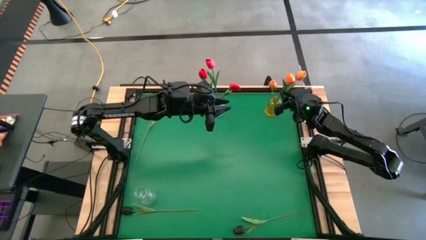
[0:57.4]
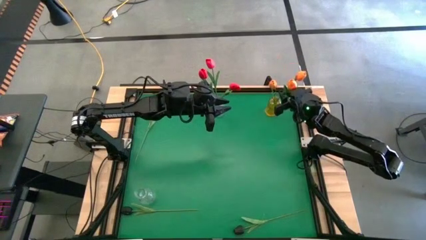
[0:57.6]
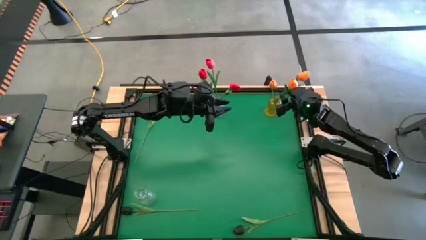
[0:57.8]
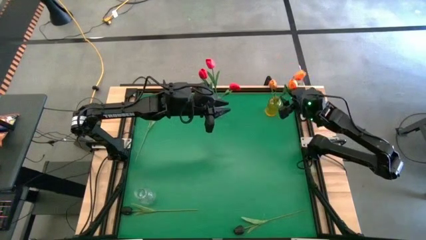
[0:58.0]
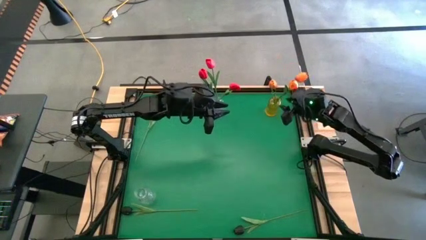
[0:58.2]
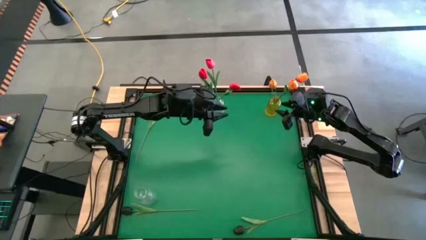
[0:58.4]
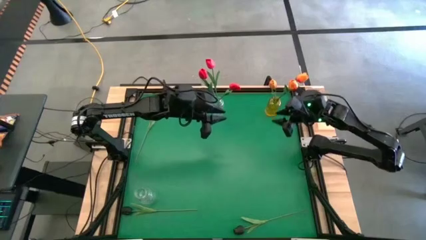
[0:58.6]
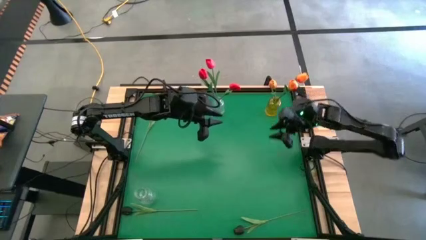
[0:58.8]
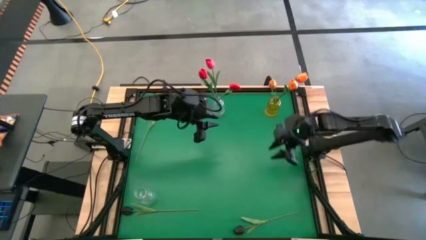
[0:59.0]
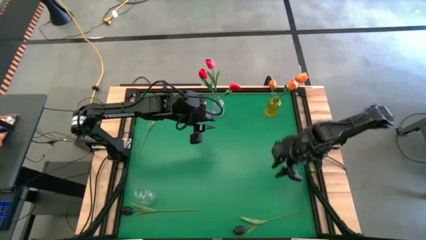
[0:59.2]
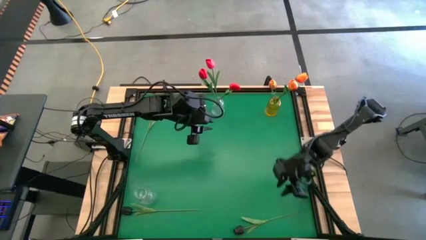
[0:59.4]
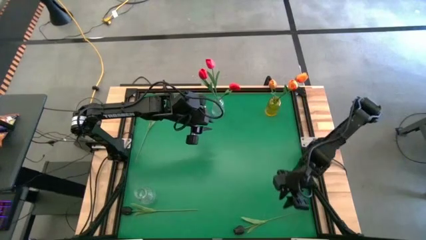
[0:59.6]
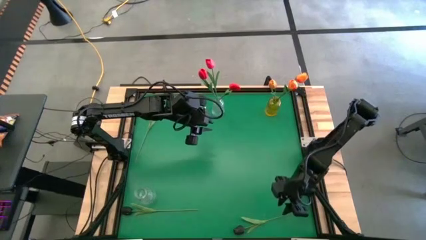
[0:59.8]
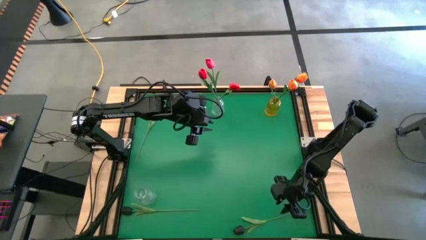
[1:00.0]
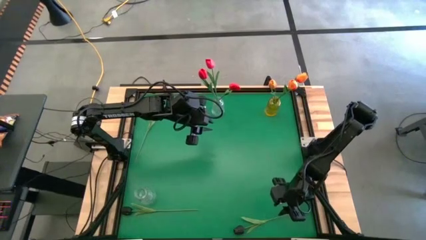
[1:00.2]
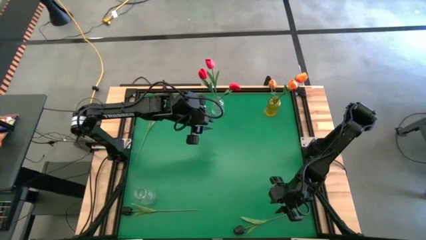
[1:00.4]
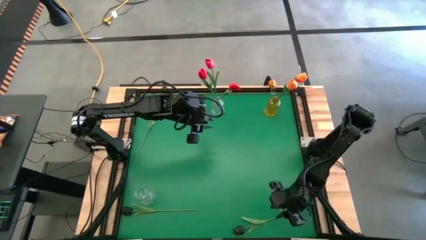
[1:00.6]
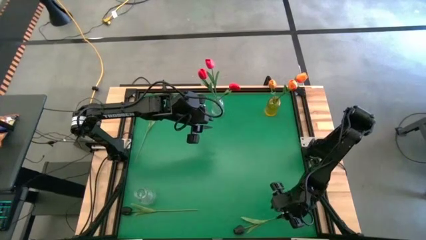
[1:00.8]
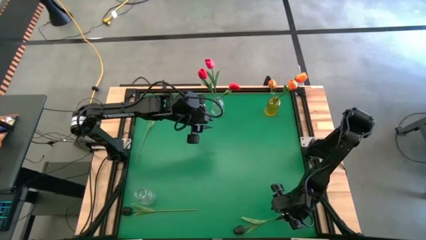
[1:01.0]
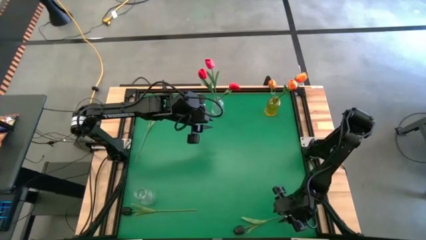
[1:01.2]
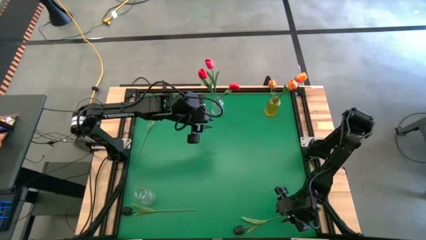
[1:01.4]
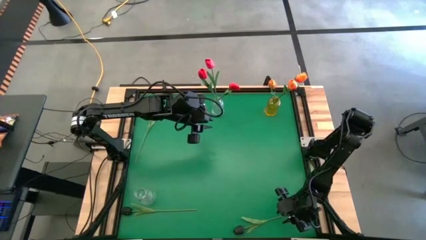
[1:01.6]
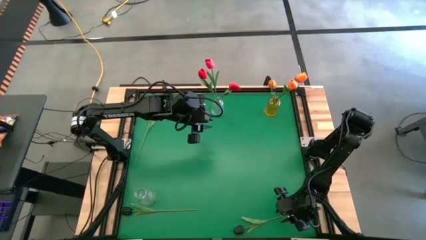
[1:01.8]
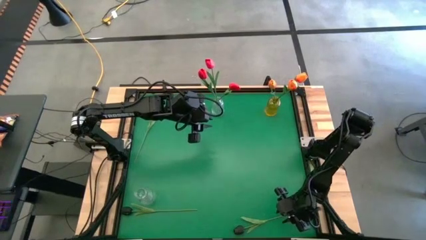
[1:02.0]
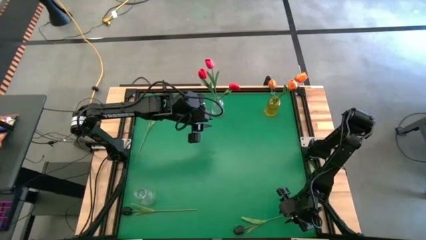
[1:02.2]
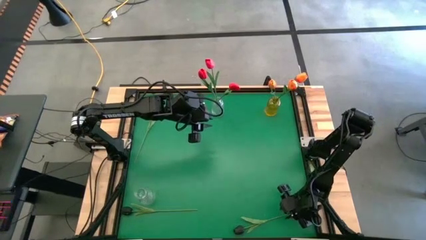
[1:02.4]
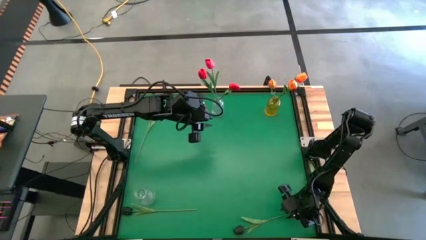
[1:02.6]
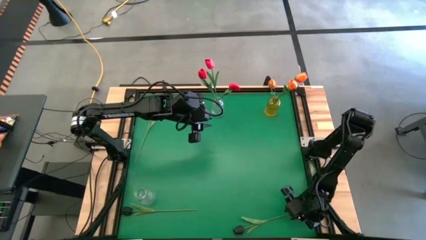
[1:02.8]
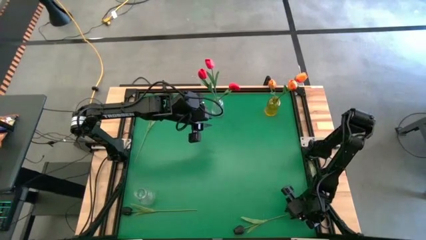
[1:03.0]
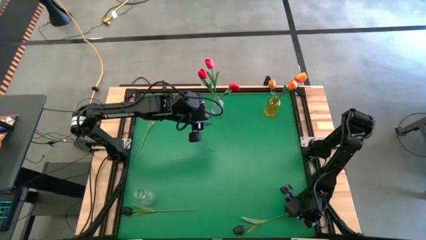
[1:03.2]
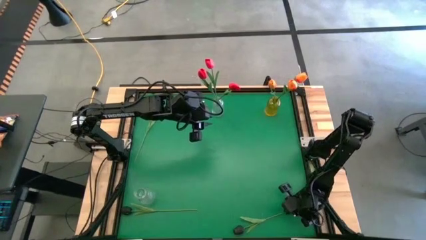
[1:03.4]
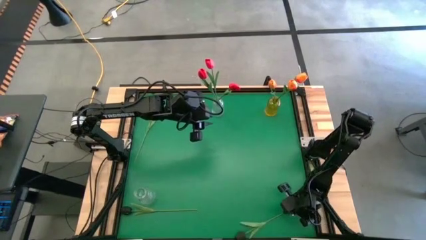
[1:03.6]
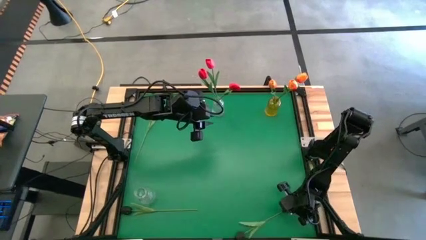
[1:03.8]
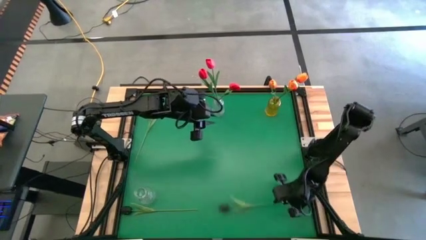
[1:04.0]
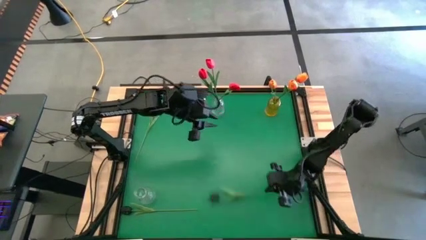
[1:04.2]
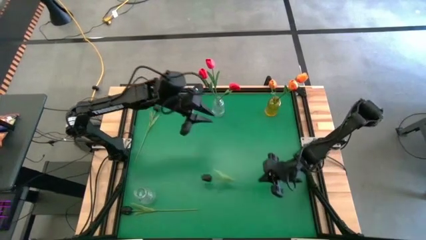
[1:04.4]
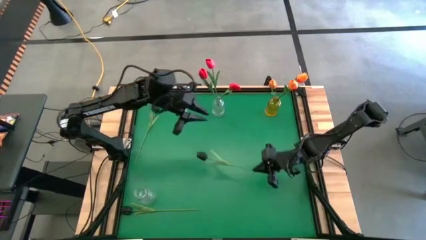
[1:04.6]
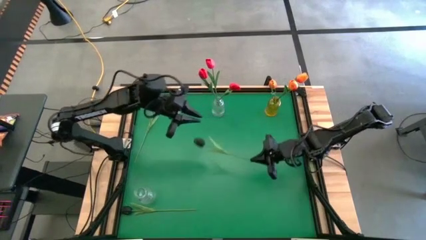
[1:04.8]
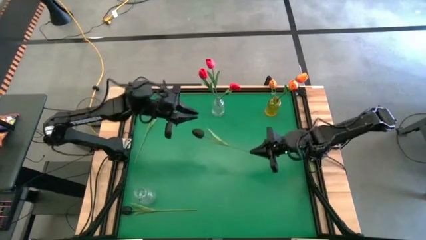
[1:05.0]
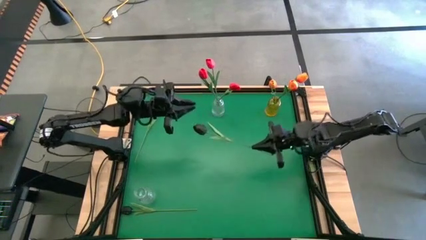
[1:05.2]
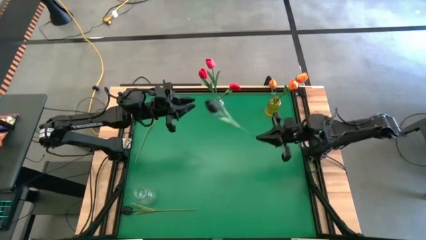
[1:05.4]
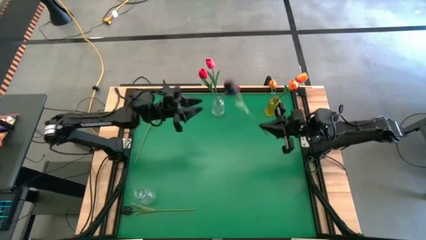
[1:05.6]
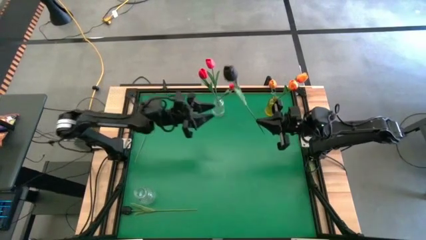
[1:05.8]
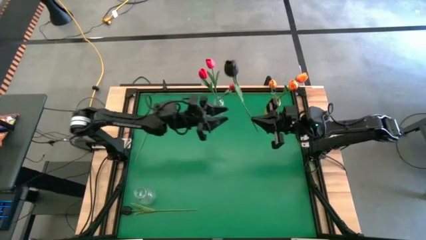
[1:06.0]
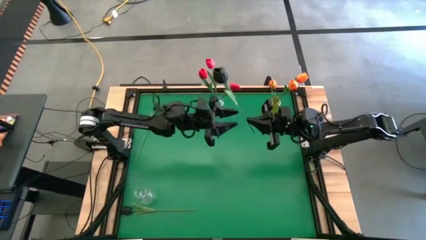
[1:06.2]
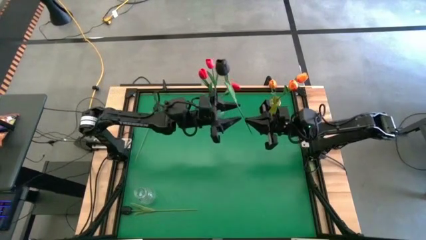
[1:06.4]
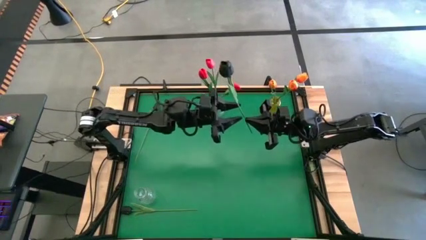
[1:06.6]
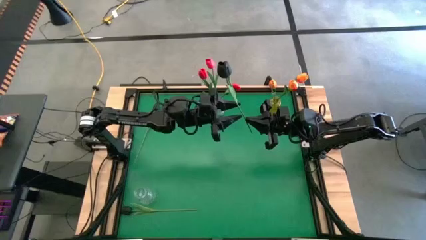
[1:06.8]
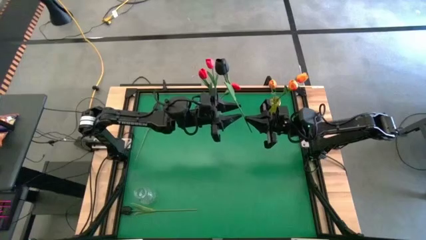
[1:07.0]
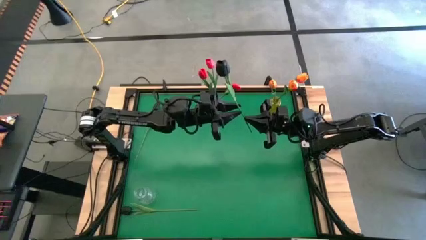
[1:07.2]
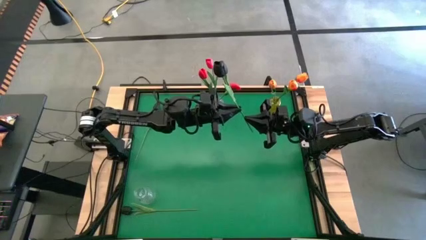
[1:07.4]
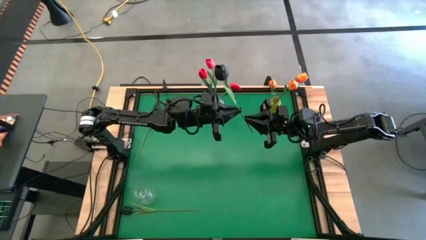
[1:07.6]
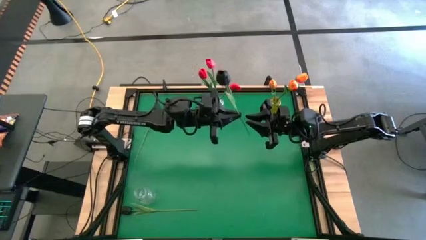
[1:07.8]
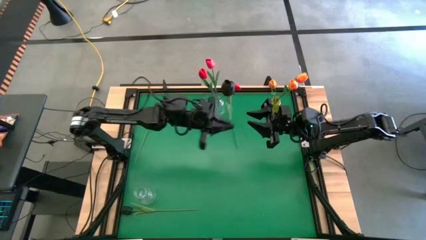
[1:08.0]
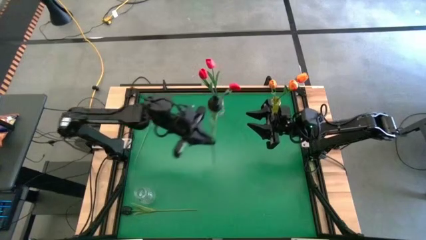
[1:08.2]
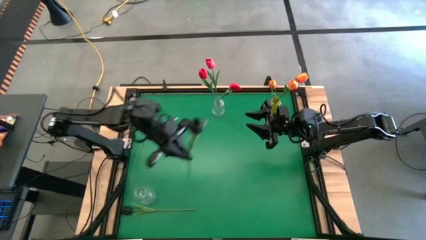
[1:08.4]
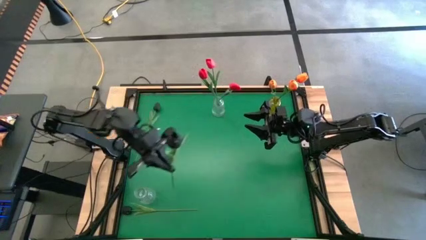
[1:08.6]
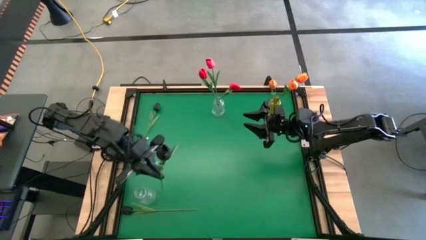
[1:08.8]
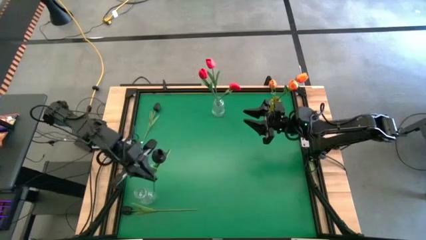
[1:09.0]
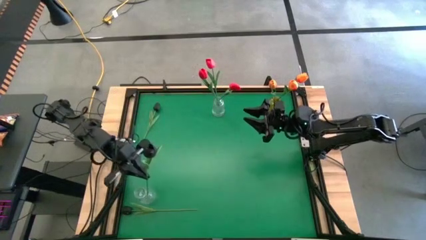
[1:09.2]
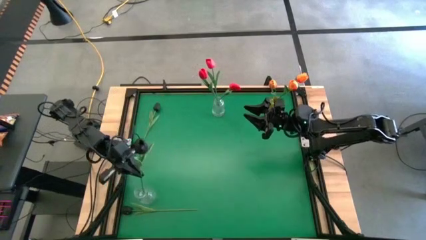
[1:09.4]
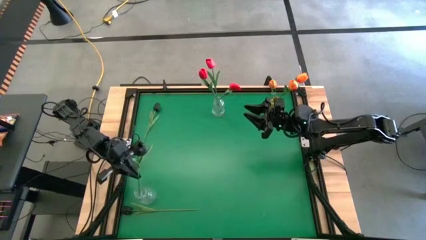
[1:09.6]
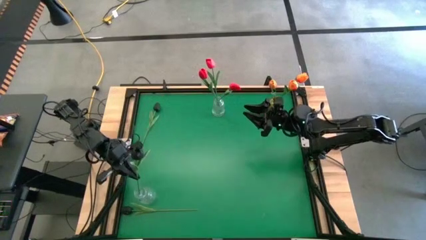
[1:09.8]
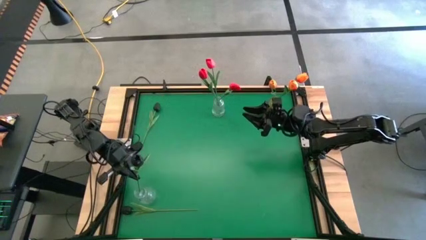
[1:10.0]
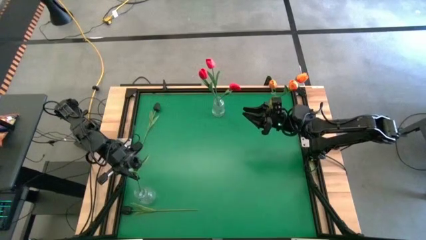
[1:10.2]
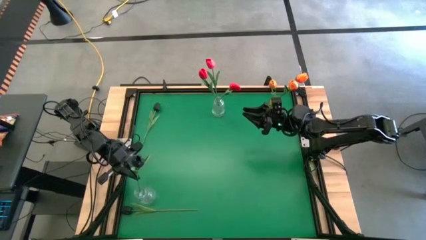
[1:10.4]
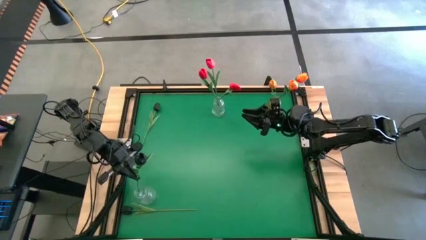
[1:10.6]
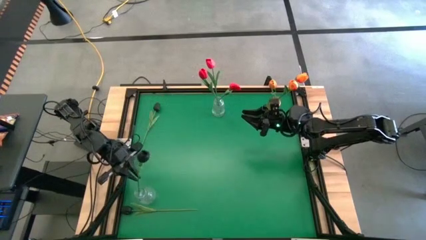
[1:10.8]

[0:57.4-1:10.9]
Task: Sort flowers into vase by color
Put the bottom right black flower into the bottom transparent vase

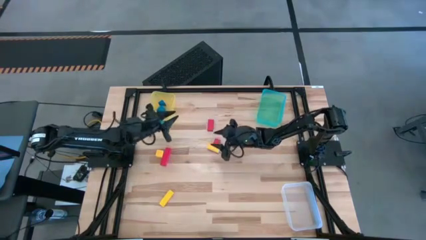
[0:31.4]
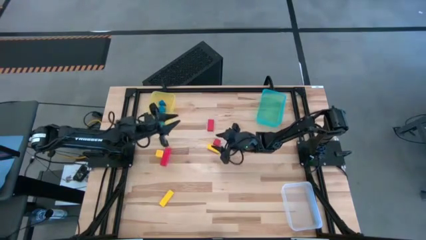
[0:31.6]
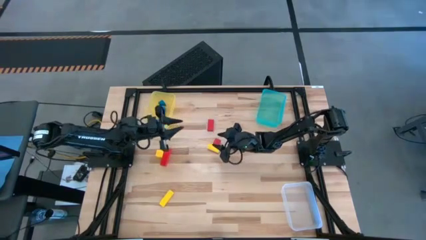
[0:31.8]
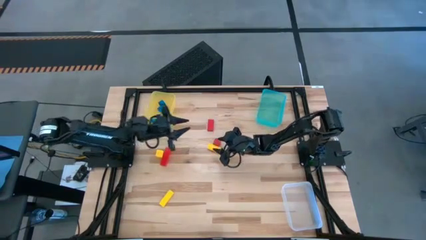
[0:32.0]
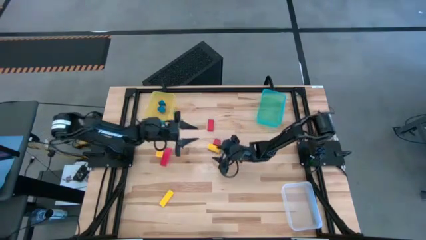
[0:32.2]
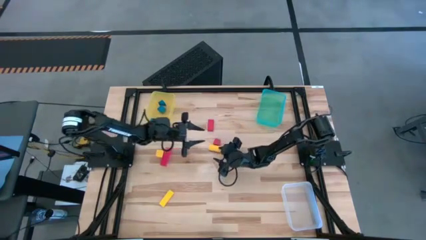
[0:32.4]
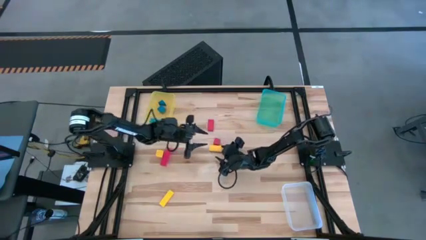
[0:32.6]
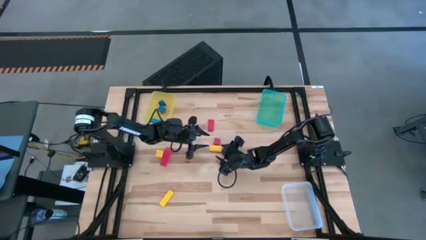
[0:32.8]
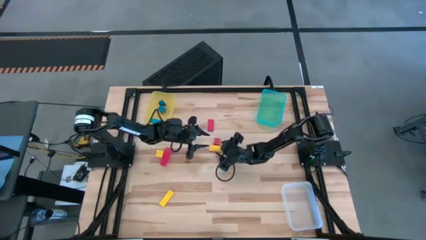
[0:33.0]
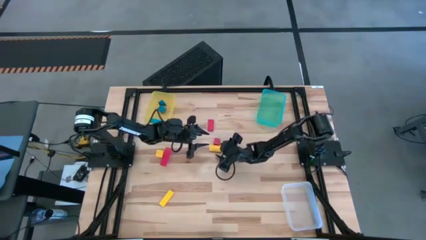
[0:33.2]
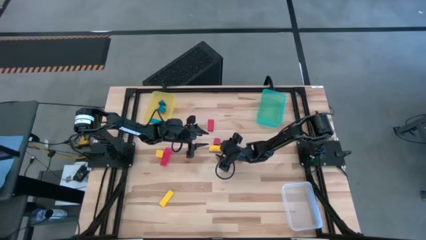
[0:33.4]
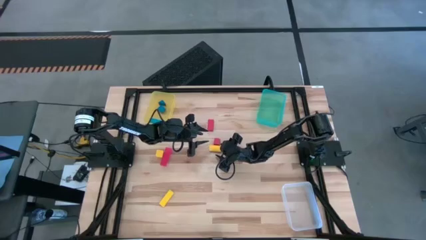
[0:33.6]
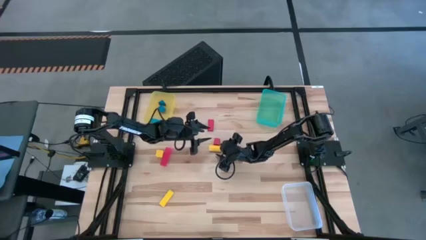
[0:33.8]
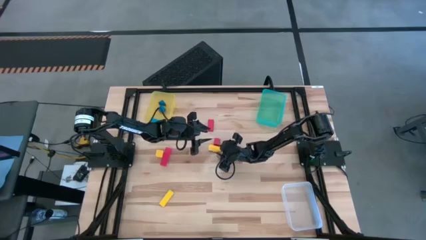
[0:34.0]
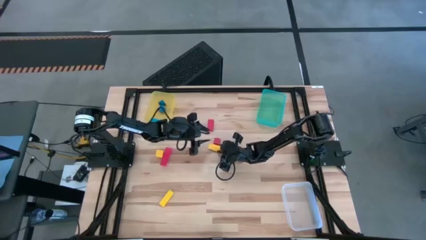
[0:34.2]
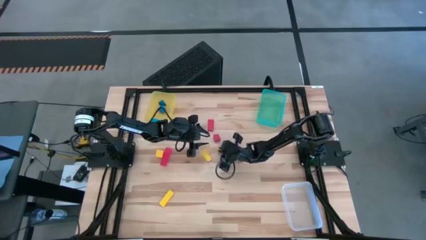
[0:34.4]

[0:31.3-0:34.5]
Task: Sort & place blocks by color
Put yellow cylindrical block into the light blue bin
